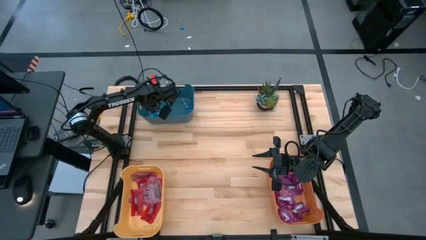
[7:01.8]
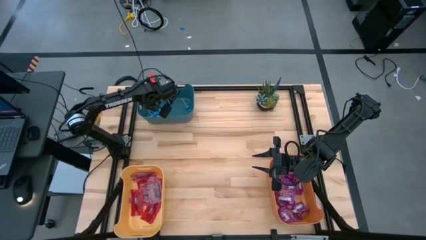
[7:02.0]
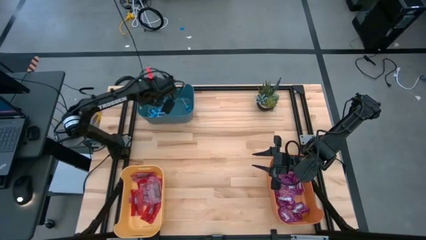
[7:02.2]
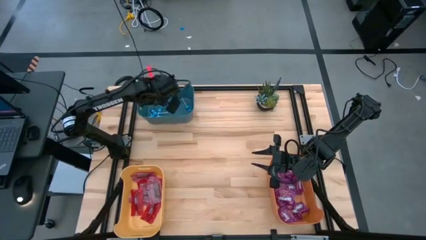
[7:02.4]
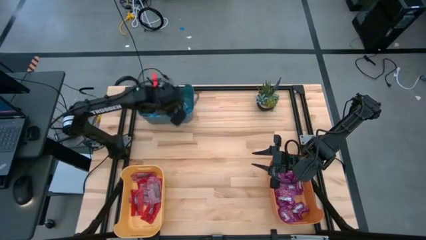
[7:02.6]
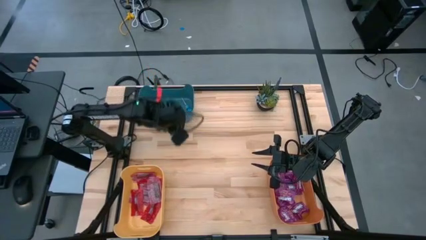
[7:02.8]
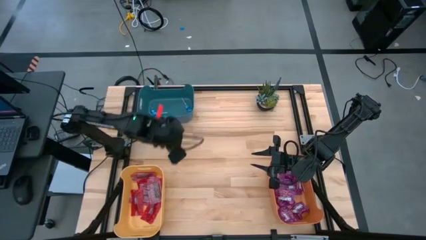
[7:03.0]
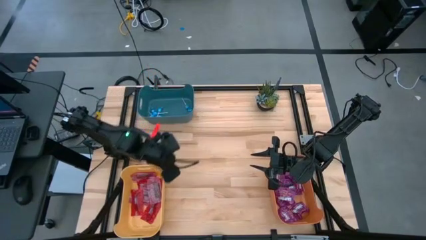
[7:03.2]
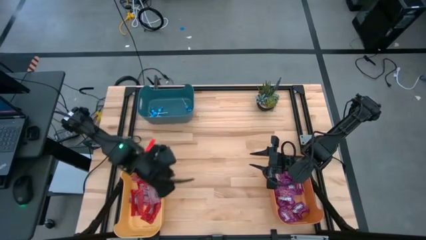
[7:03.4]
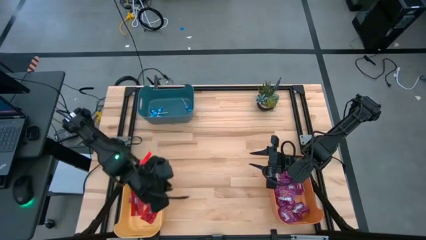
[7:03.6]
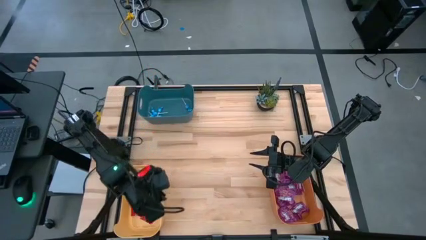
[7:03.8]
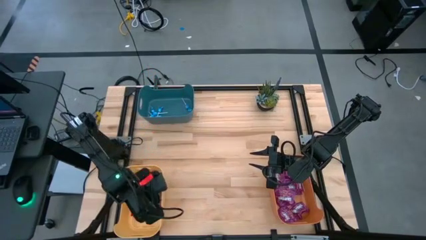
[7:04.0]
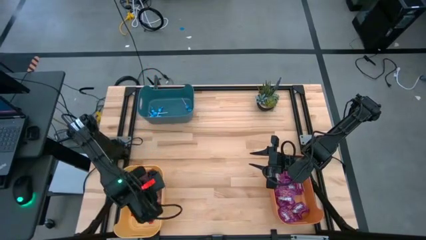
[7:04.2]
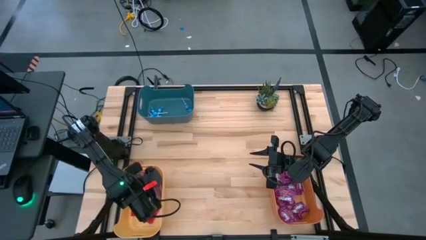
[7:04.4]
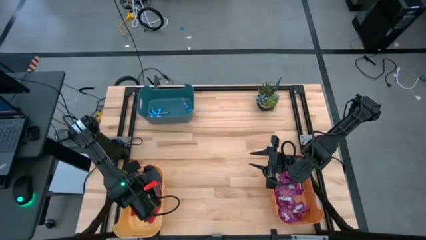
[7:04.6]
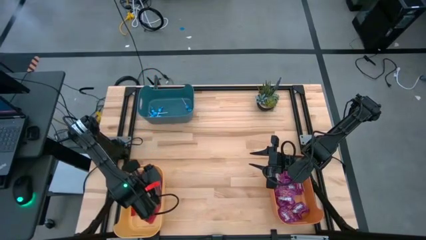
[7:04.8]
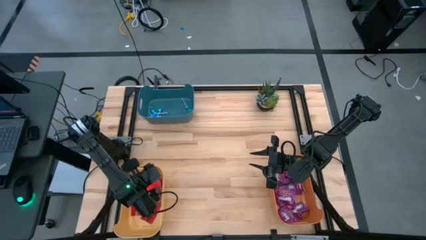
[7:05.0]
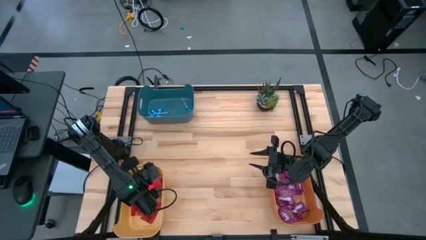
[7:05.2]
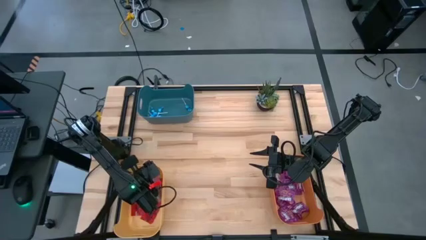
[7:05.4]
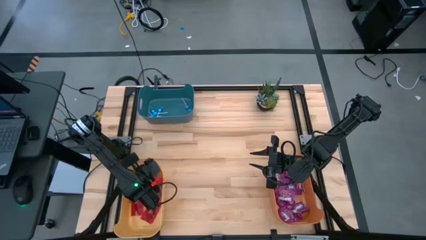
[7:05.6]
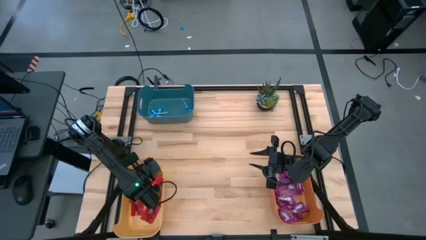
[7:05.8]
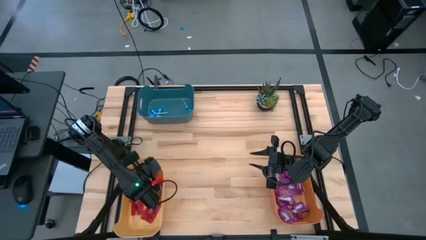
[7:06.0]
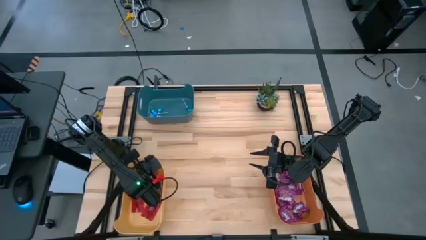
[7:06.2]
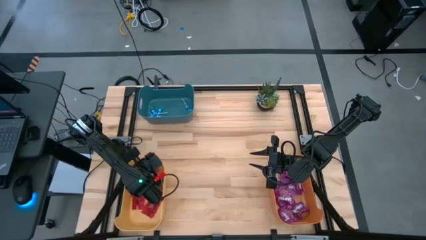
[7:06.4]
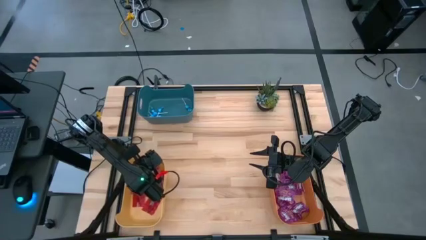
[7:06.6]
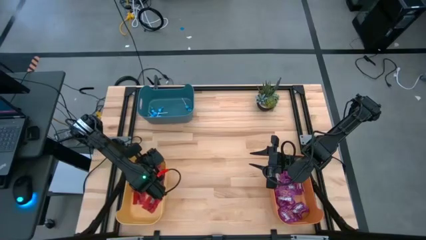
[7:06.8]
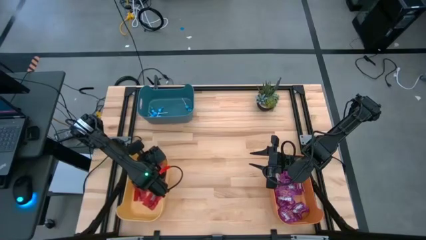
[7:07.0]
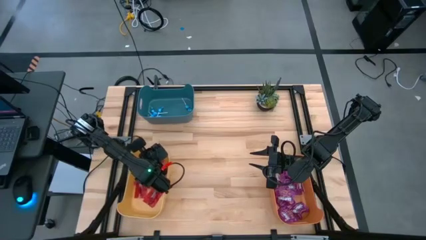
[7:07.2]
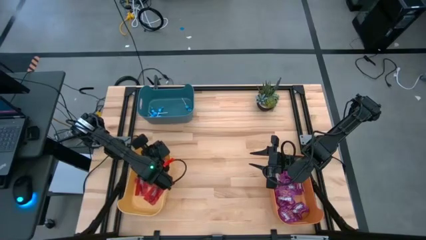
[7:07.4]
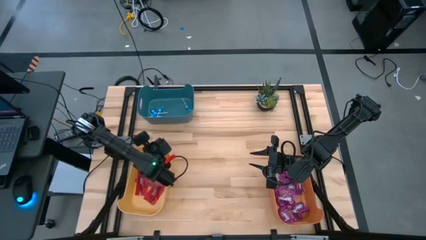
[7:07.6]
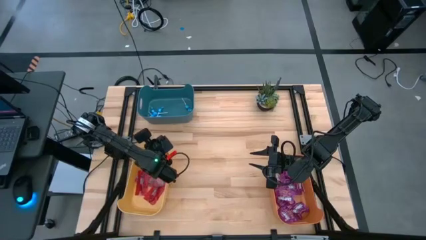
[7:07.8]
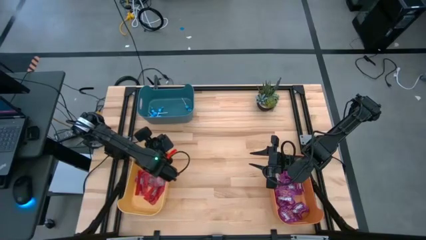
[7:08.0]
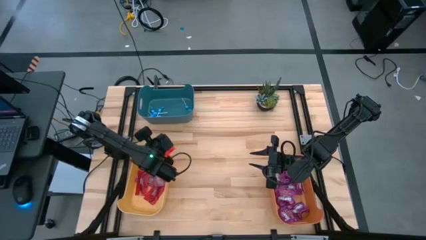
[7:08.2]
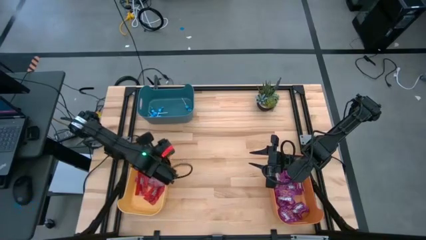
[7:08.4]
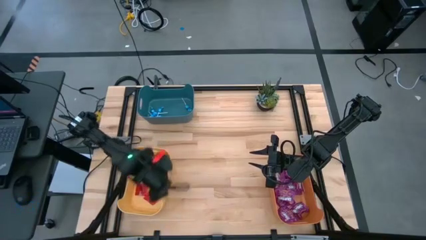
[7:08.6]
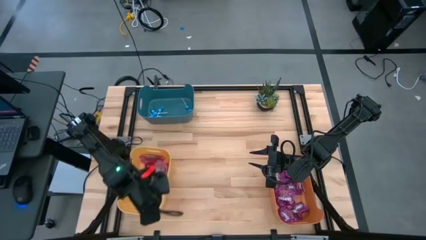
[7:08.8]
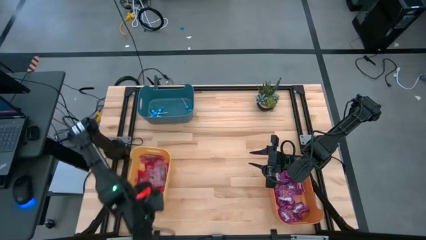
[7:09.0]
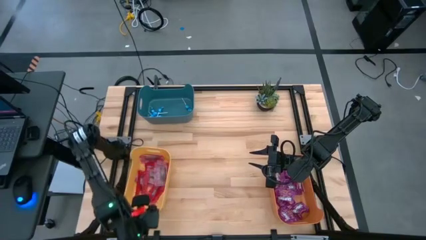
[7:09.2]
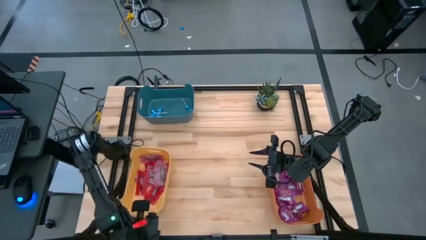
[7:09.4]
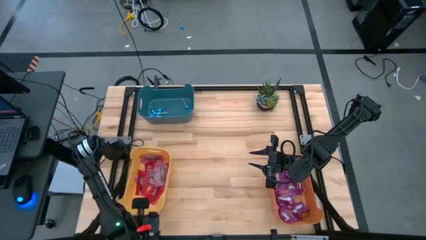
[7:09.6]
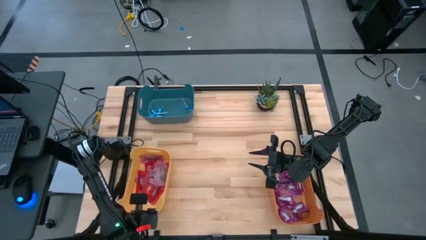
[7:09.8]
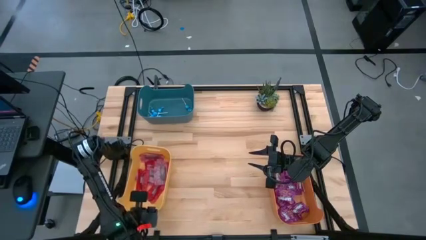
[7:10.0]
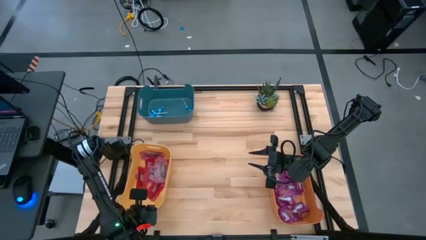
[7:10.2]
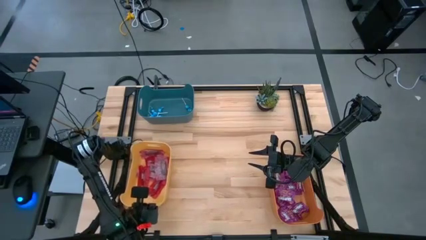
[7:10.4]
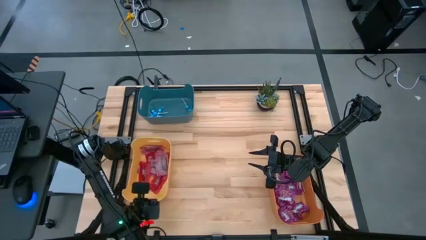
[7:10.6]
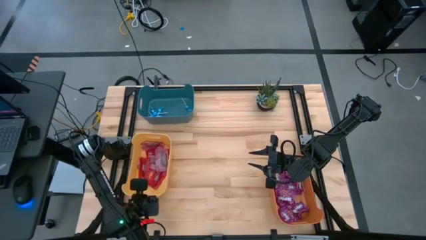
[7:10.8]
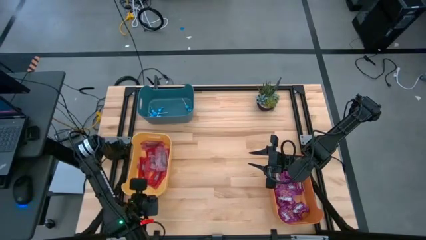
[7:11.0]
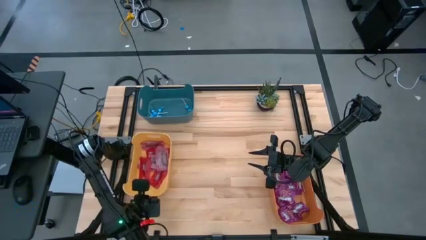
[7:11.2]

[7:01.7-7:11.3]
Task: Sort candy
Move the yellow bin to the middle left of the table

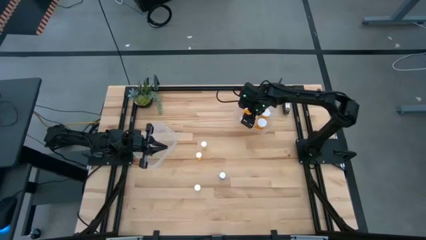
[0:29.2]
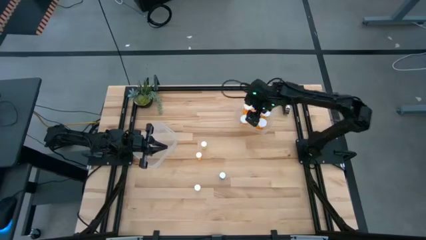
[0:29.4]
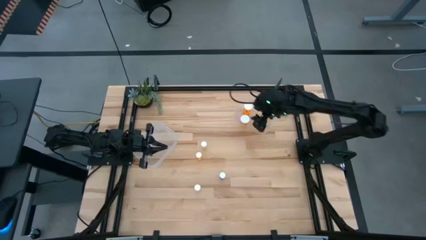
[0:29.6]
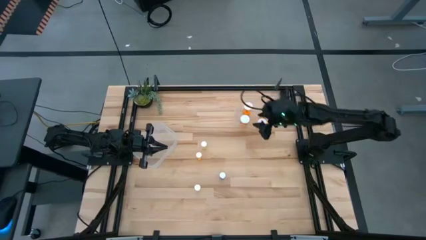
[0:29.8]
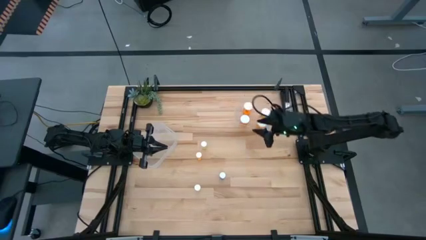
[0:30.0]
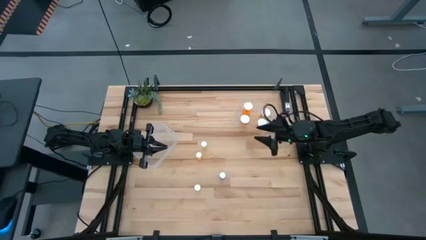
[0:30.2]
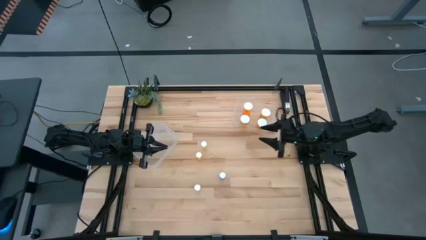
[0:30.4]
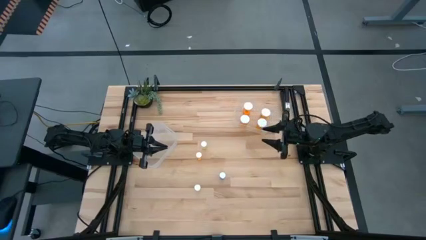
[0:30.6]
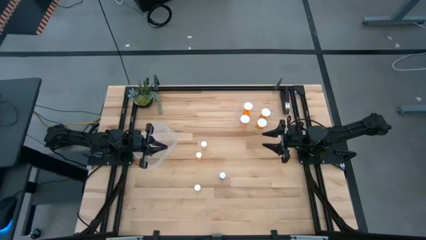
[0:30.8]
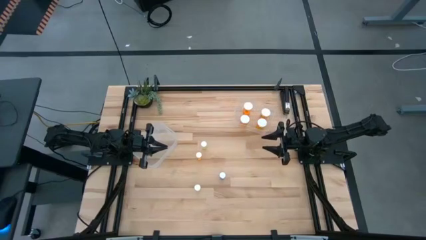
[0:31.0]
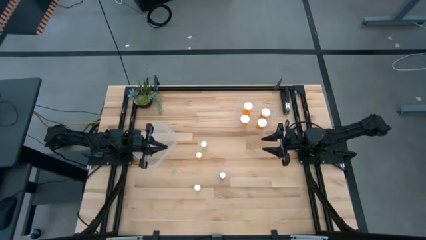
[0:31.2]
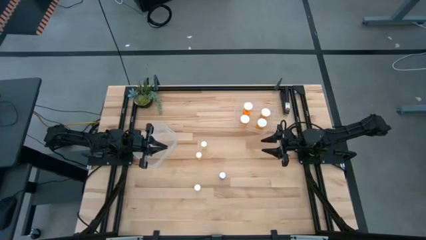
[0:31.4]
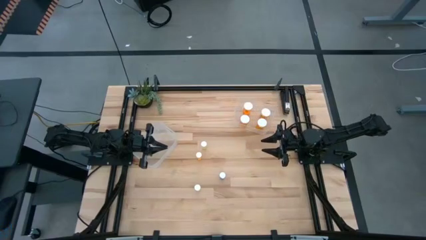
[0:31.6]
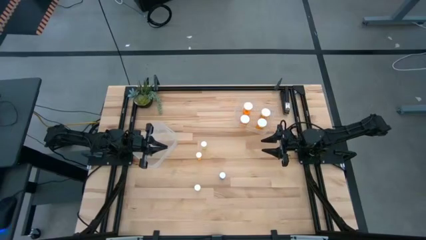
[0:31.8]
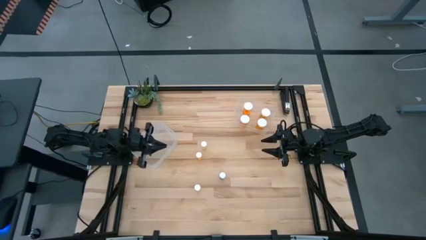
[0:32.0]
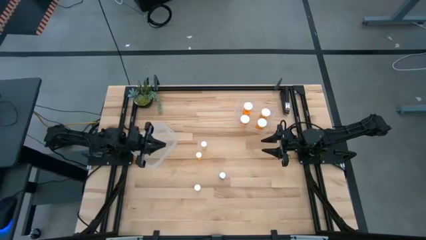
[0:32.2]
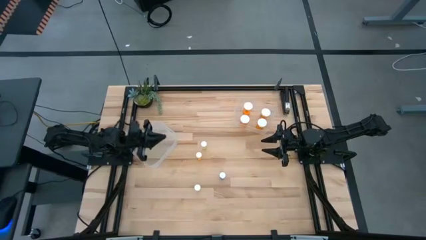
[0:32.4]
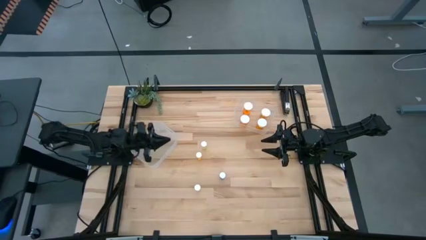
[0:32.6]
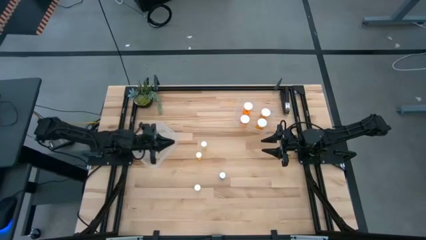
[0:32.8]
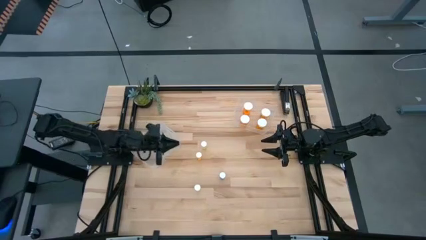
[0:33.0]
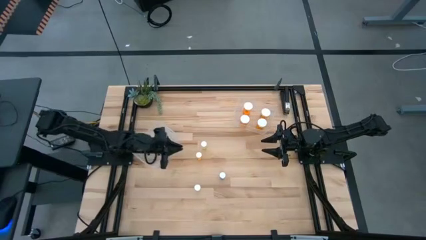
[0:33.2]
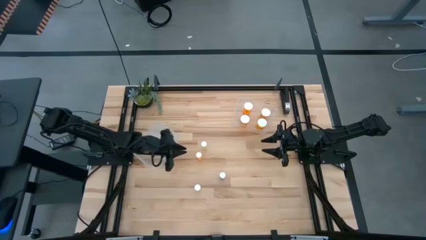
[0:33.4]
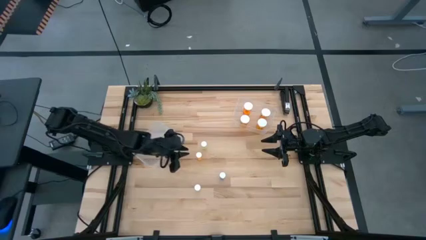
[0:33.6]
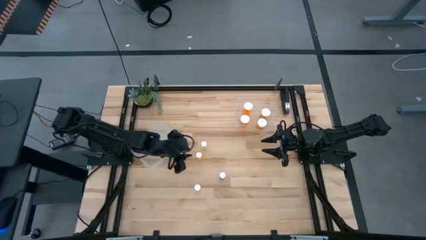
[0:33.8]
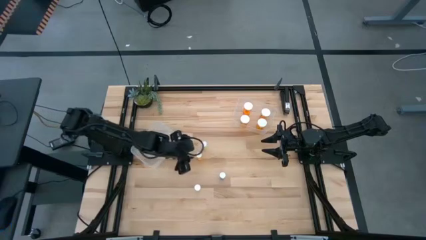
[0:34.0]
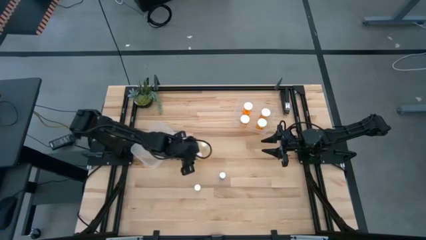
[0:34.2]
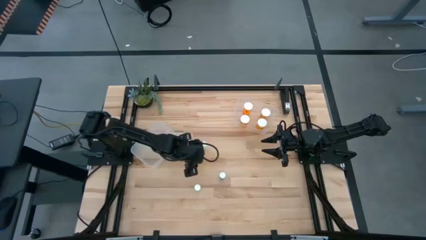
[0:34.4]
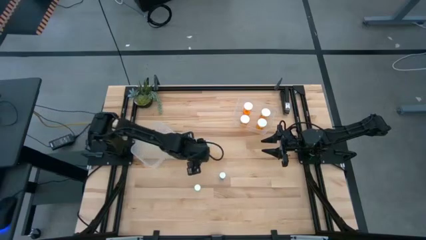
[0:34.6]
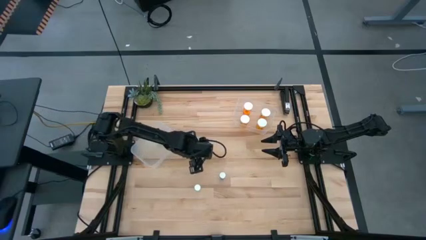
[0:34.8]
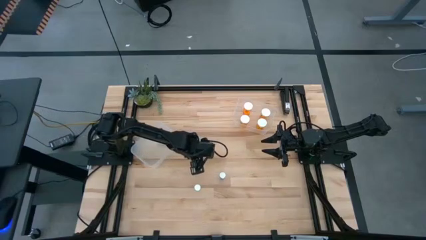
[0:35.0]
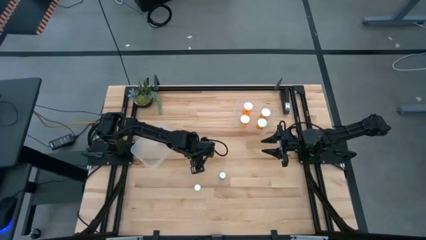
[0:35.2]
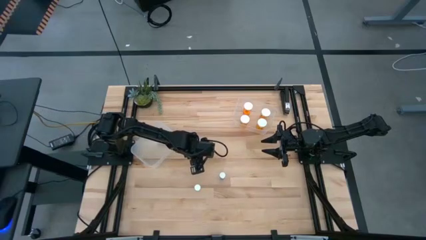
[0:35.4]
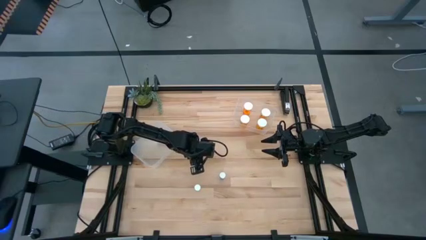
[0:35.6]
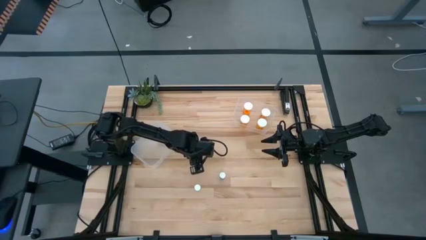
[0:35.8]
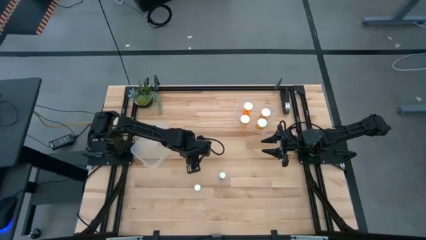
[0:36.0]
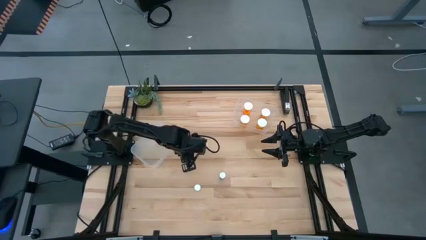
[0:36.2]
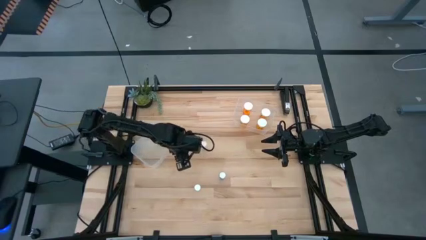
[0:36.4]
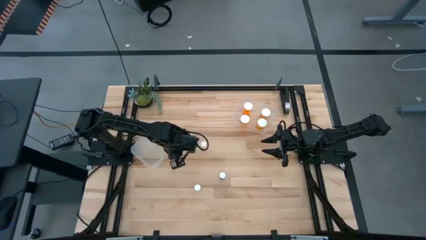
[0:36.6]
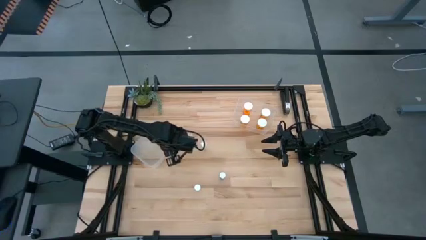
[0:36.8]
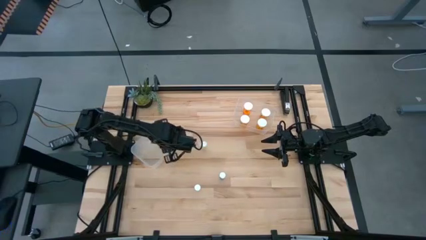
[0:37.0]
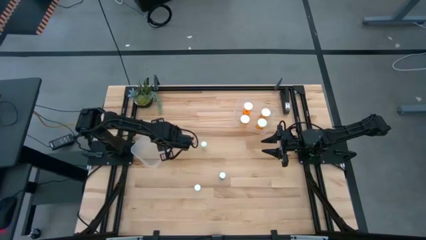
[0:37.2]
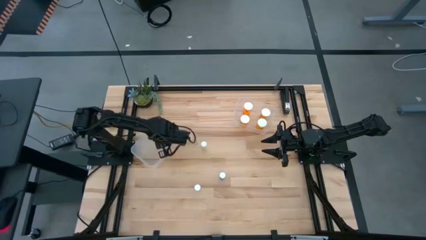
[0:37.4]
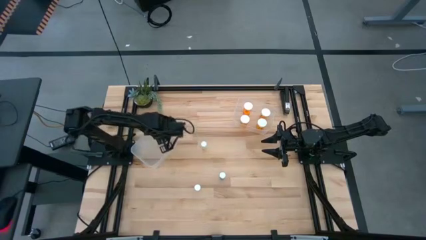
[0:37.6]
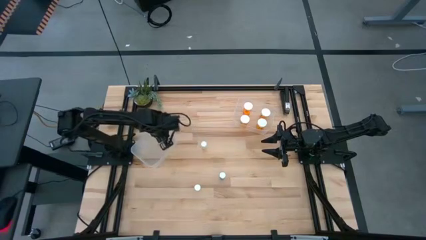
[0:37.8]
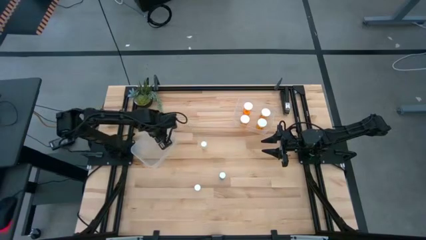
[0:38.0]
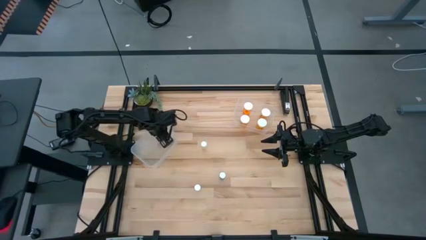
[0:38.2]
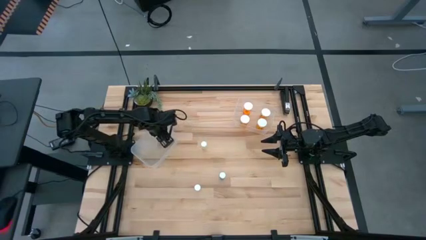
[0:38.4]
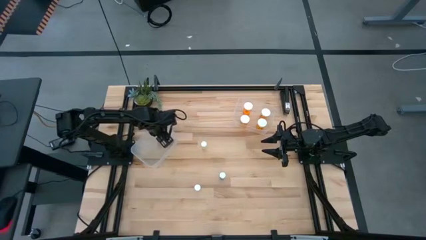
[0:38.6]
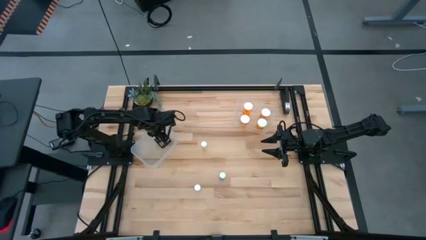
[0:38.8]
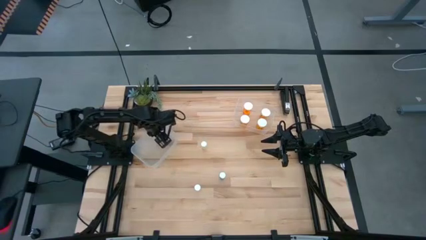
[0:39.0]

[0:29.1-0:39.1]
Task: Pick and place medicine bottles into bin by pill shape (circle, oval)
Put the small orange pill bottle into the left transparent bin
